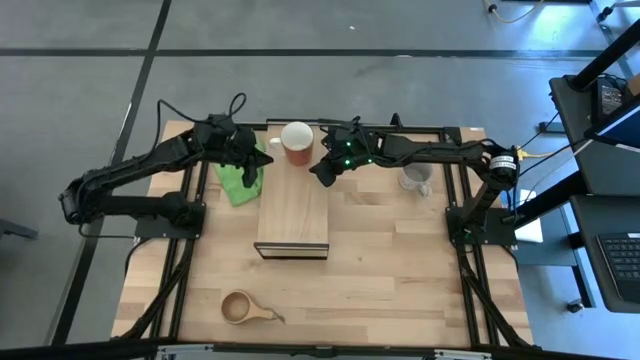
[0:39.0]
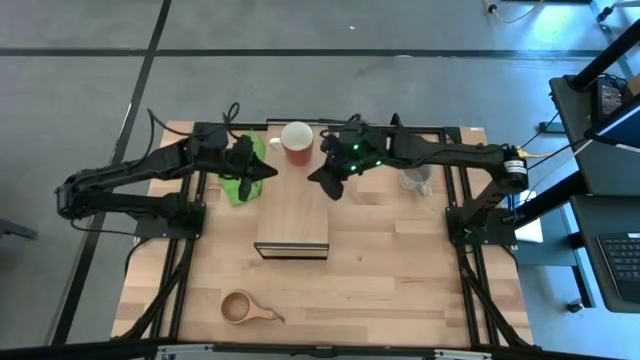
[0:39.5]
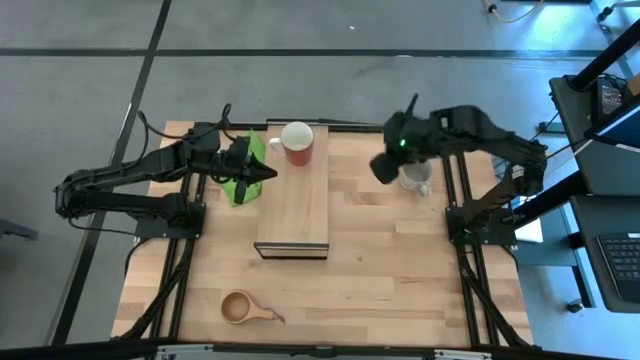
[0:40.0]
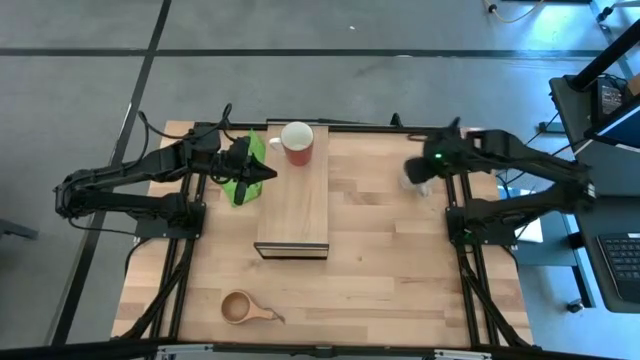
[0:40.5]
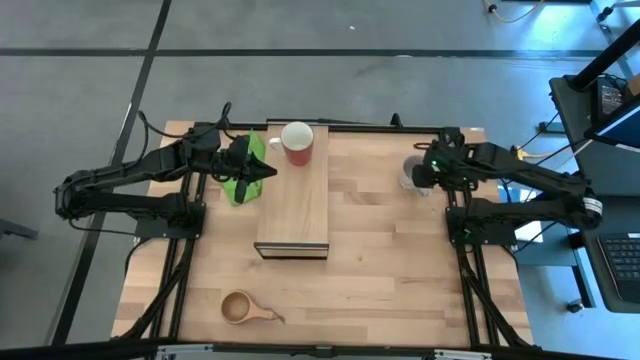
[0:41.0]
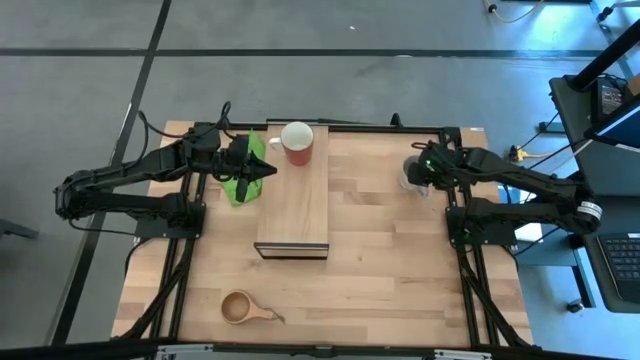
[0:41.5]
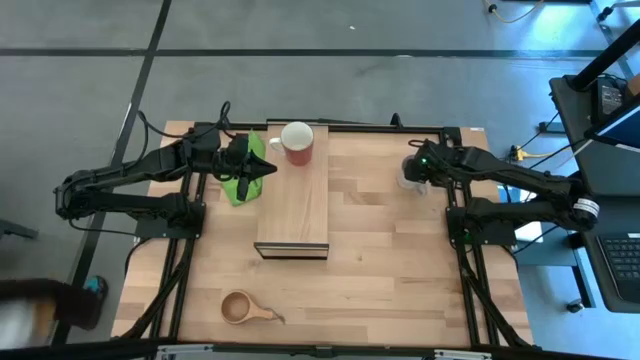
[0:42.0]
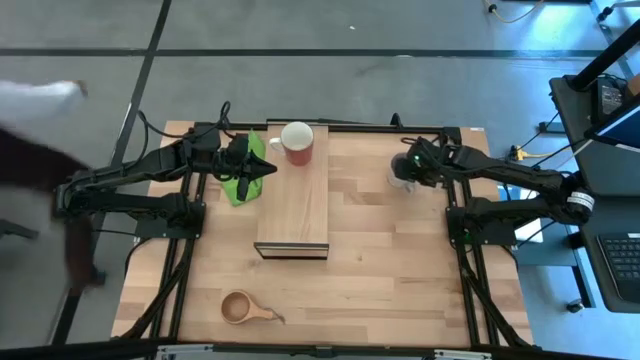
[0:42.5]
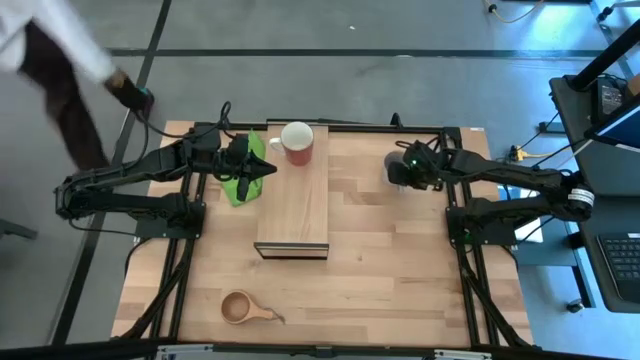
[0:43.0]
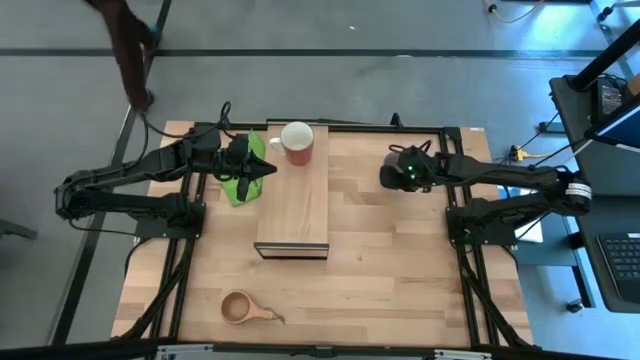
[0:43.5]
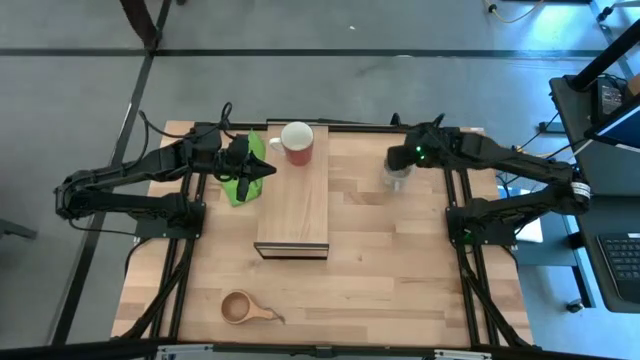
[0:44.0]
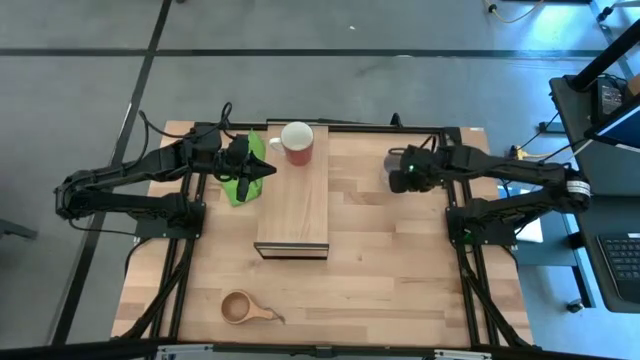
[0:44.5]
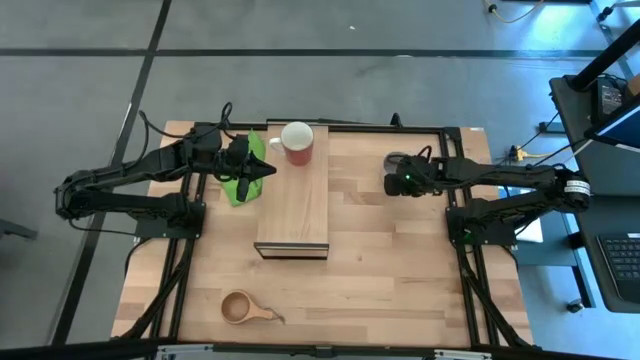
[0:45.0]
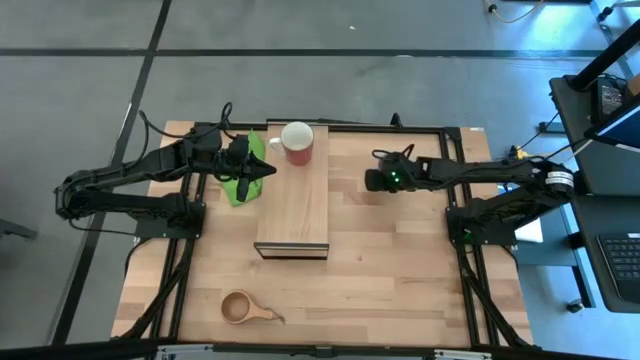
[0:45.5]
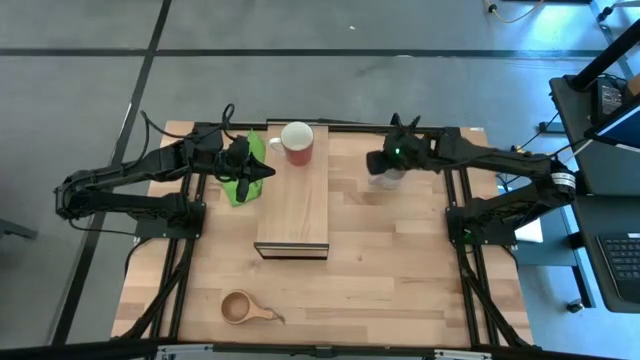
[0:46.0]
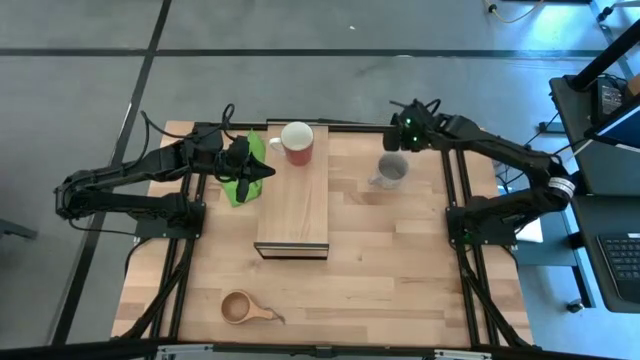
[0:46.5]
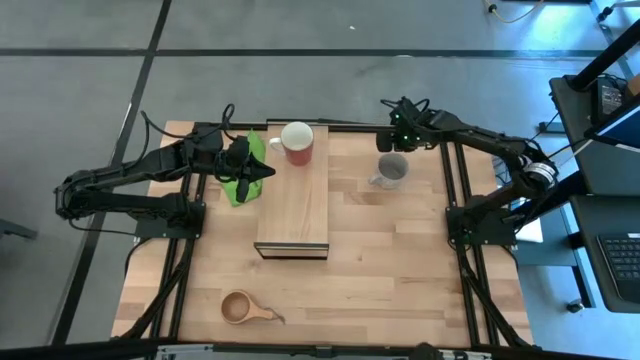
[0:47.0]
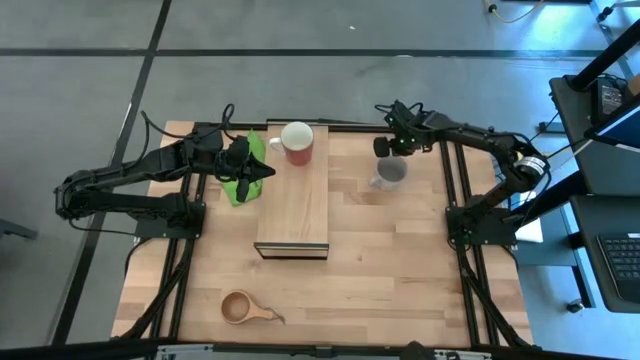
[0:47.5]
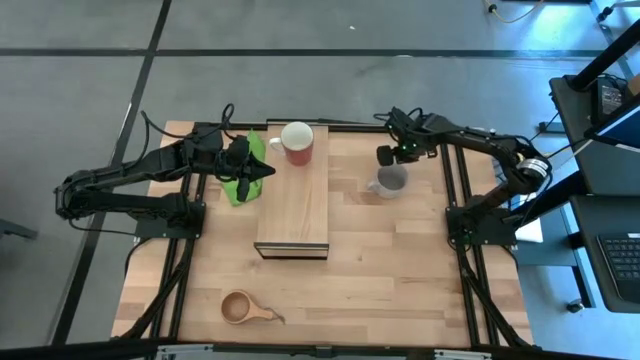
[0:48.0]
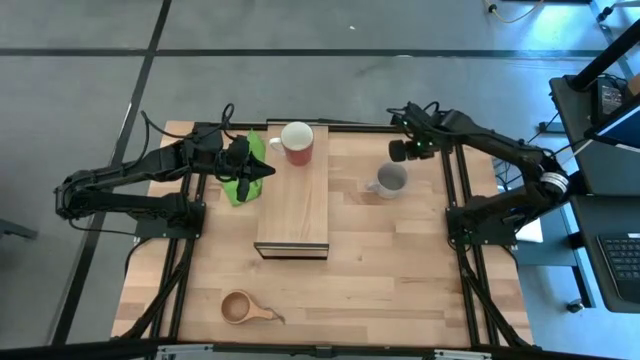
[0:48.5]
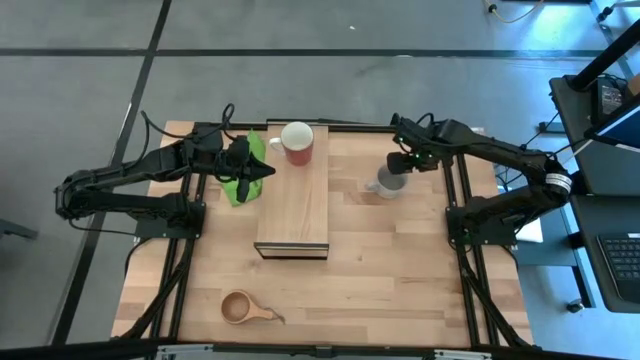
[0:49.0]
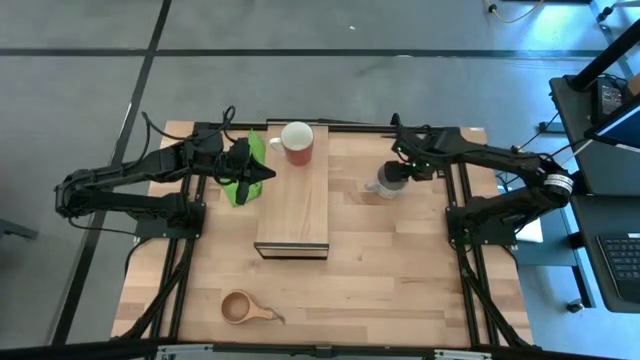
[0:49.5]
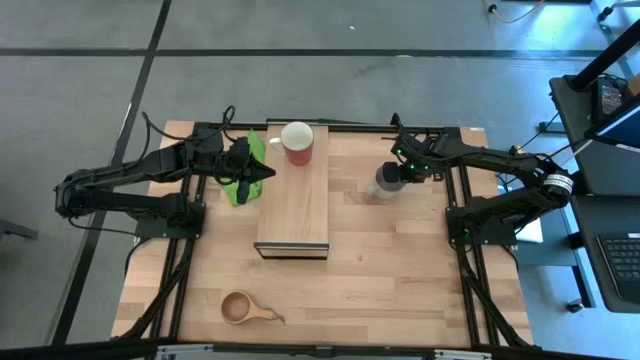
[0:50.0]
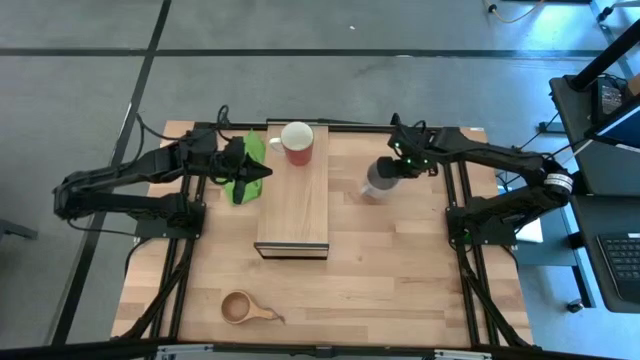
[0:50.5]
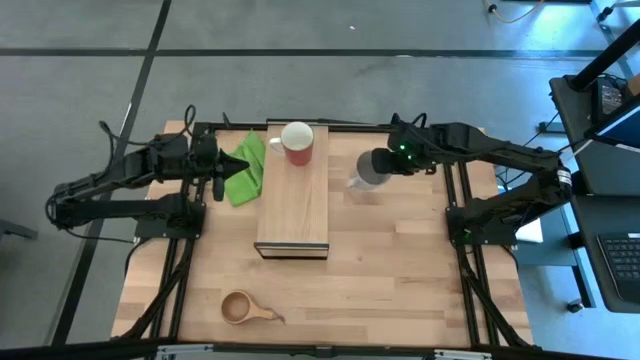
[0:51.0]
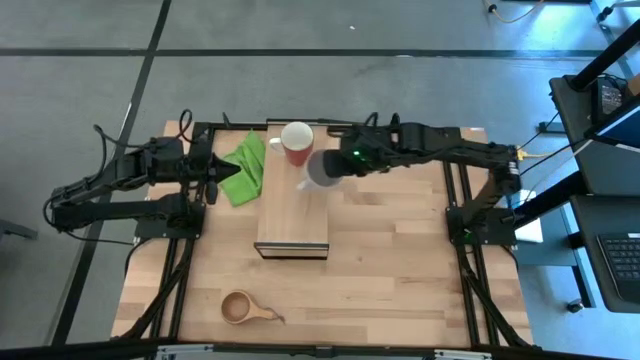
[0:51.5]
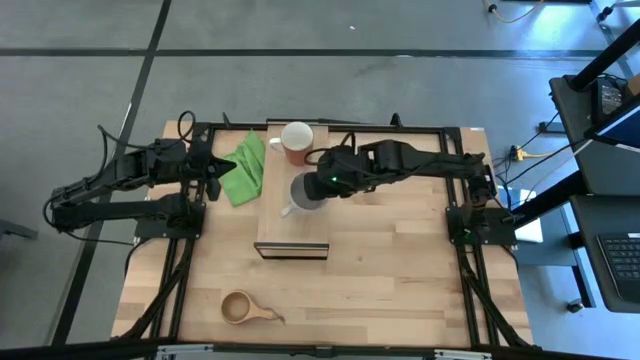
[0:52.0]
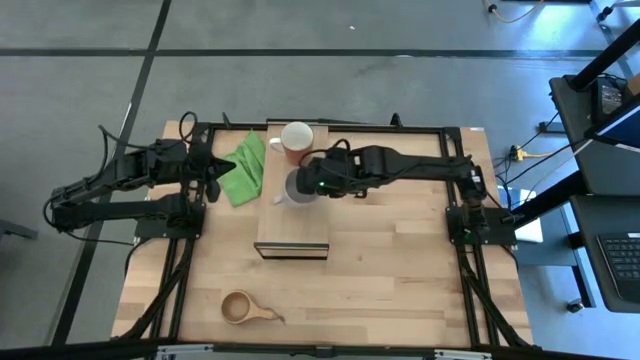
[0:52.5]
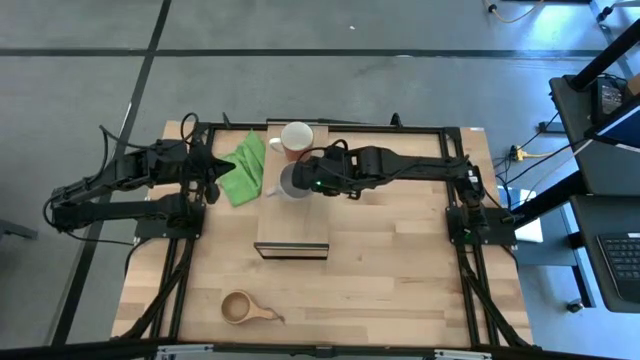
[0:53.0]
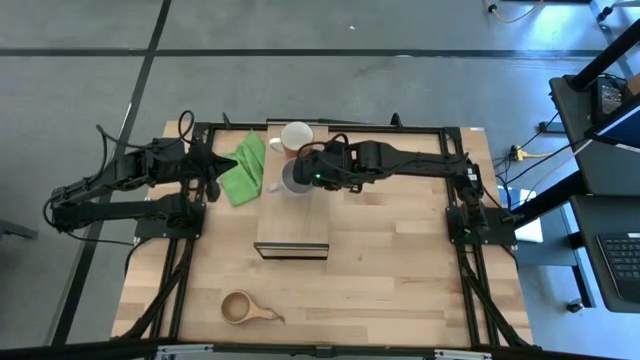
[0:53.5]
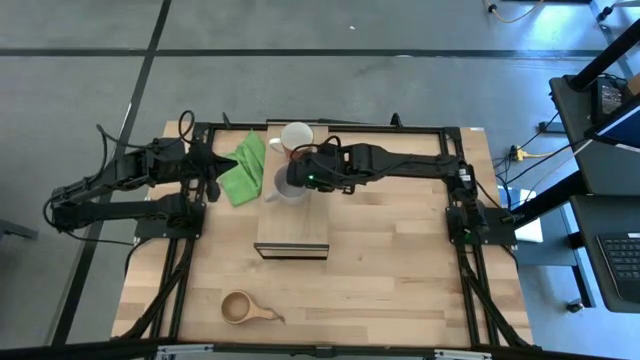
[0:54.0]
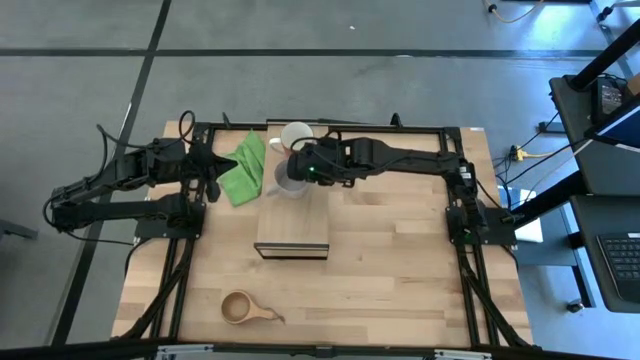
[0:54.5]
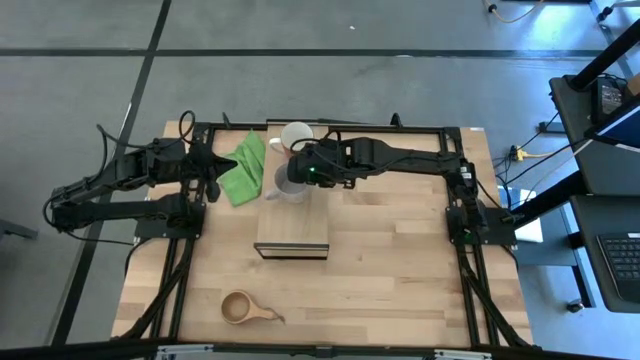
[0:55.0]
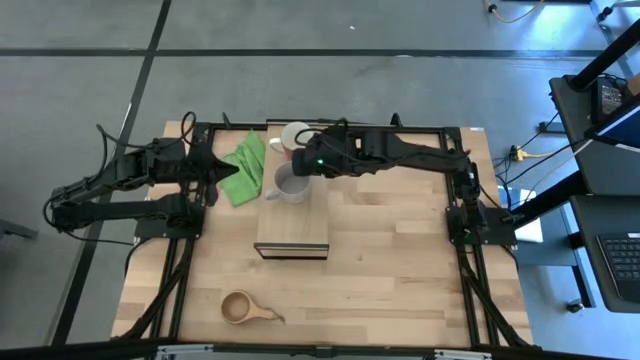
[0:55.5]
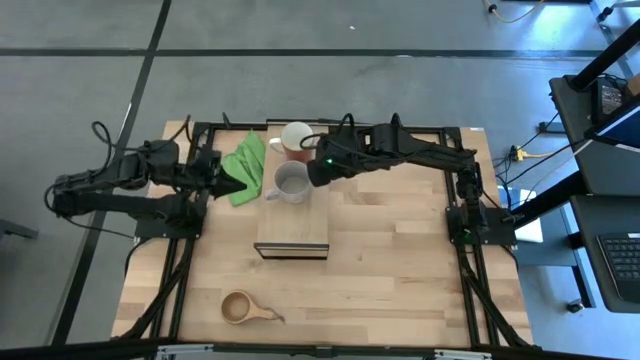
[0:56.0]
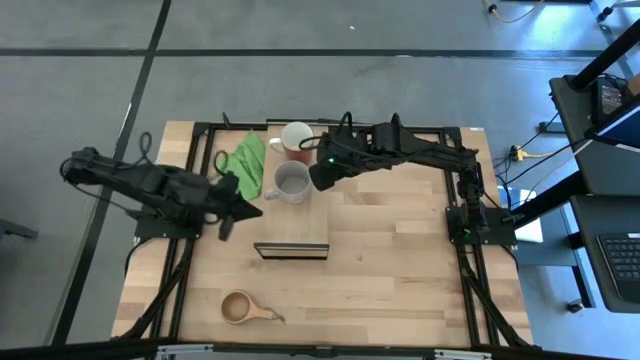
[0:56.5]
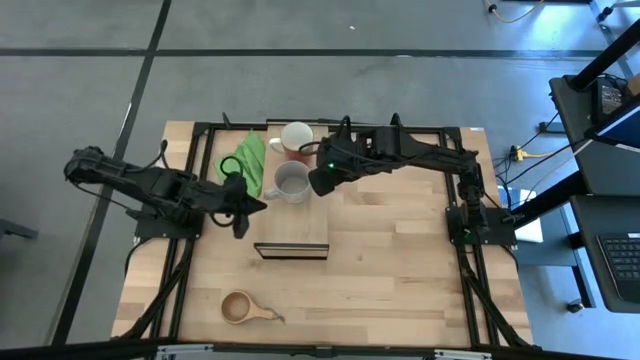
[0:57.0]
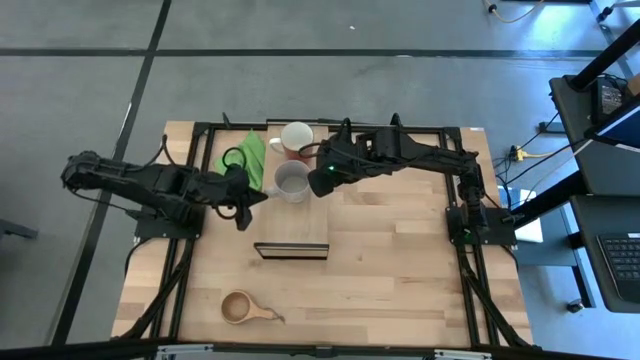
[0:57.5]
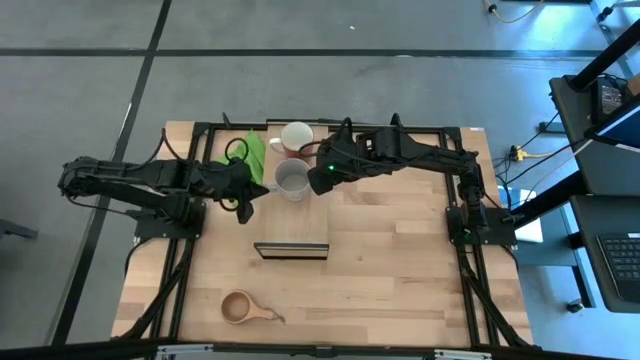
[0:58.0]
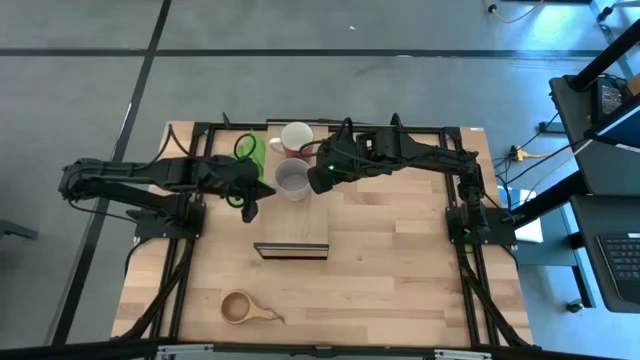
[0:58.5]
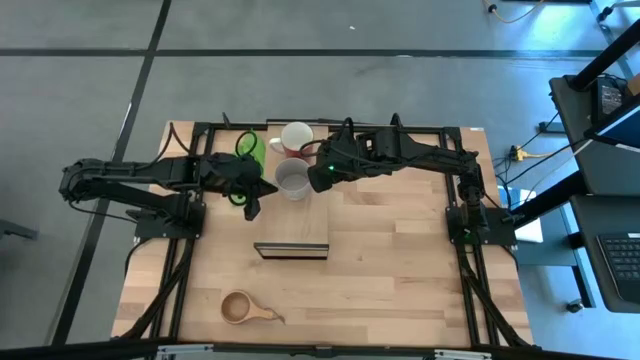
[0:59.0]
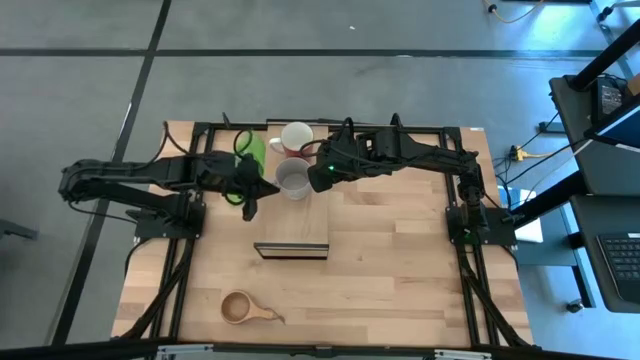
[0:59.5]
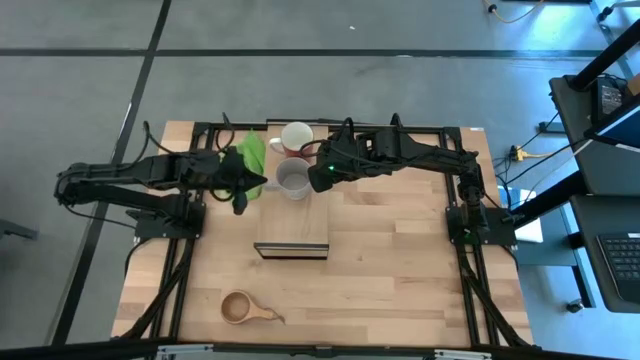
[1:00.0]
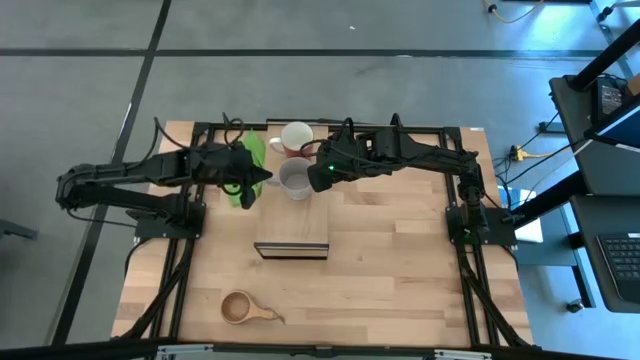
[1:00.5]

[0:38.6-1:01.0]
Task: Stack small to large cups/mugs on shelf
Put the gray mug on the shelf
